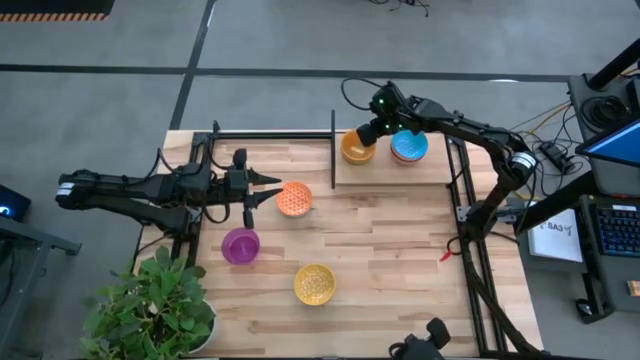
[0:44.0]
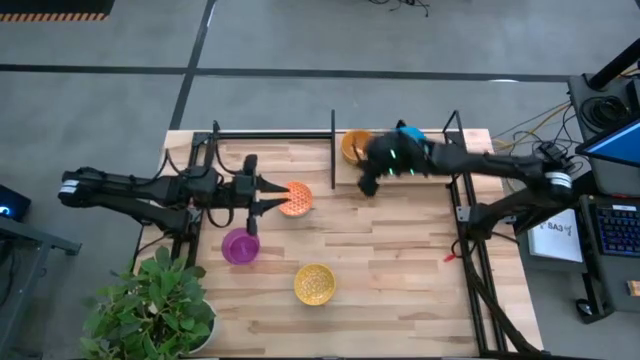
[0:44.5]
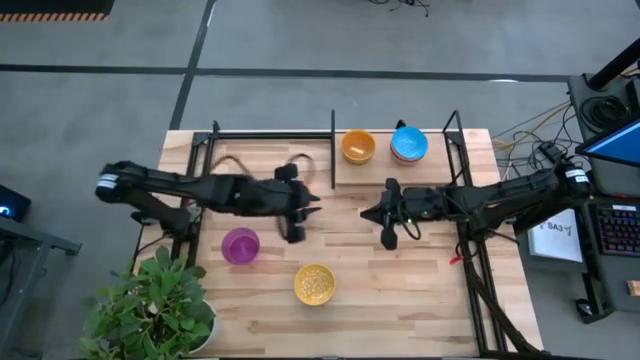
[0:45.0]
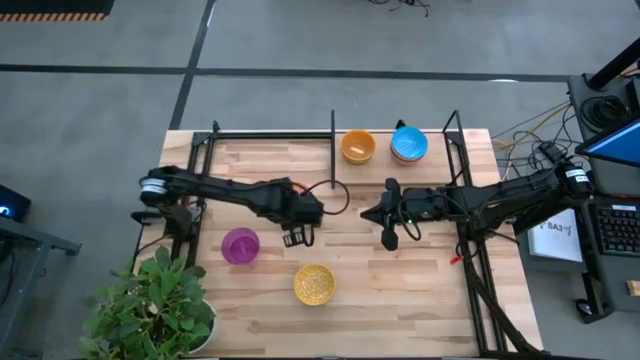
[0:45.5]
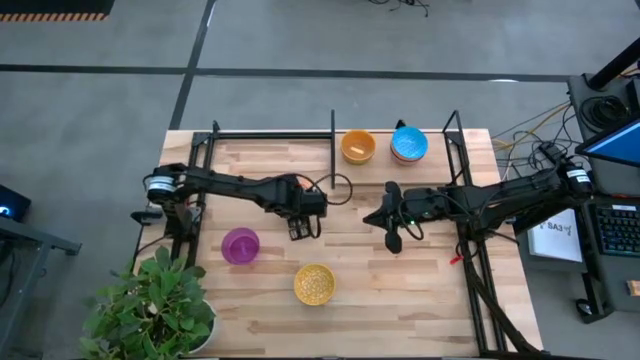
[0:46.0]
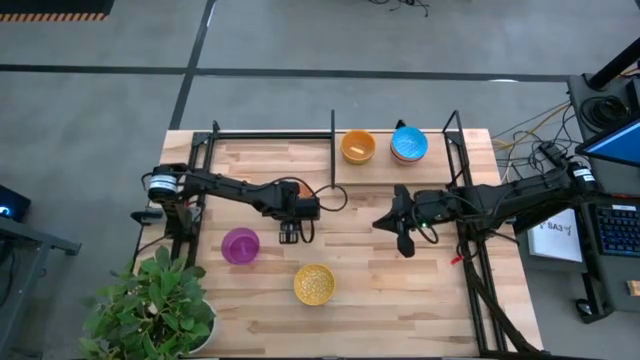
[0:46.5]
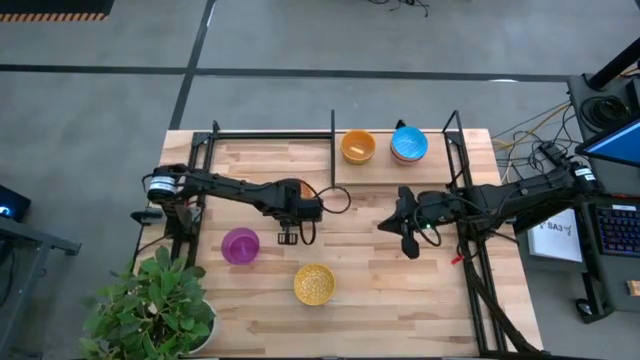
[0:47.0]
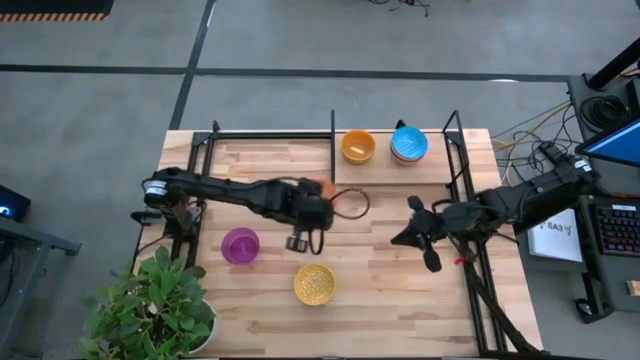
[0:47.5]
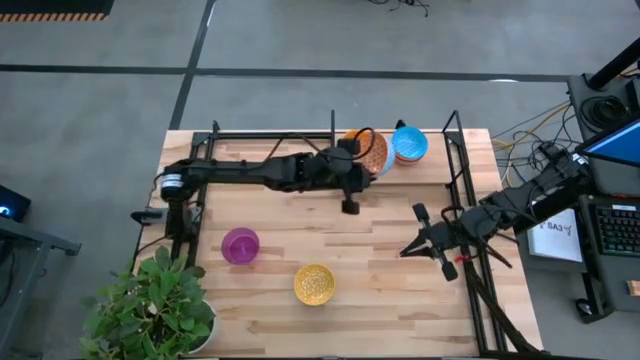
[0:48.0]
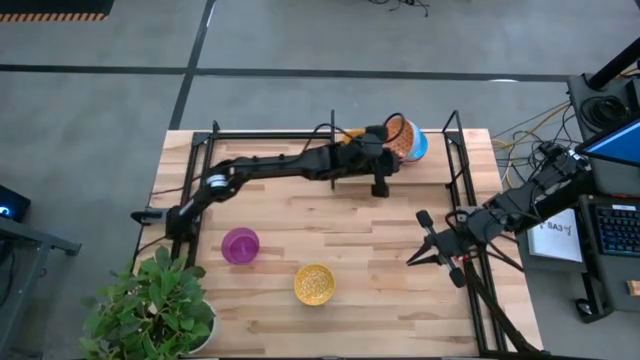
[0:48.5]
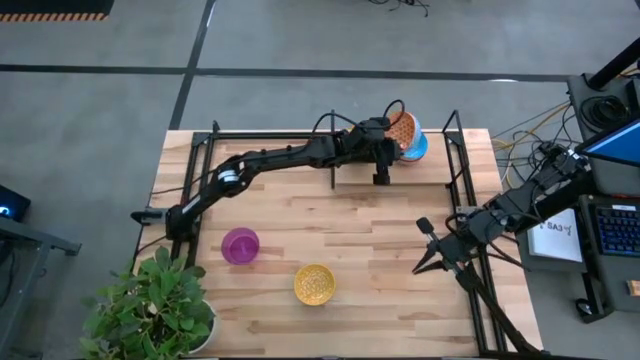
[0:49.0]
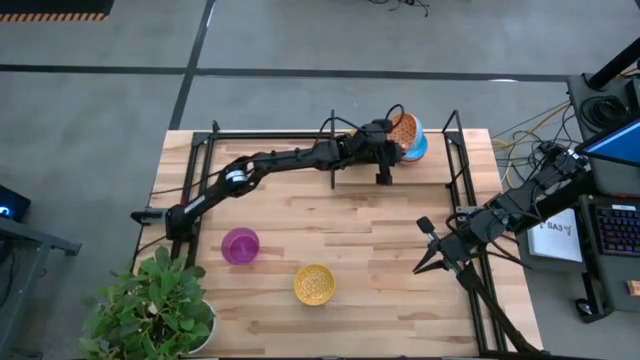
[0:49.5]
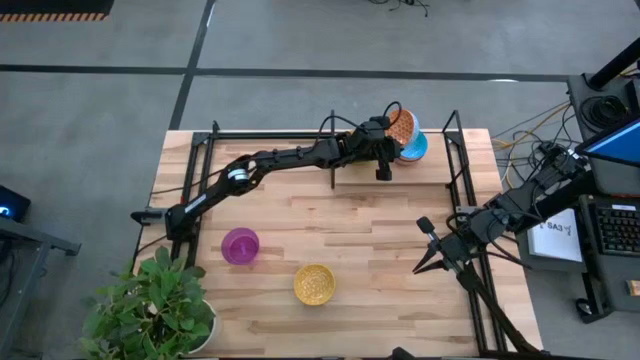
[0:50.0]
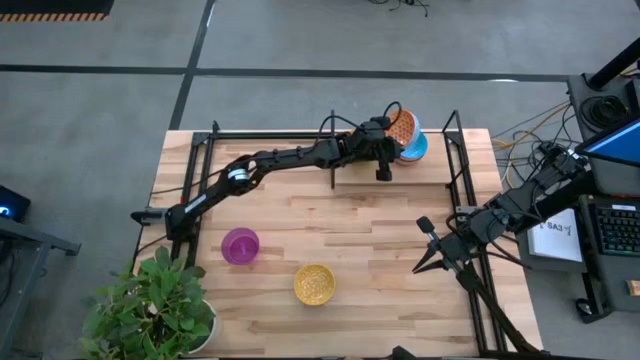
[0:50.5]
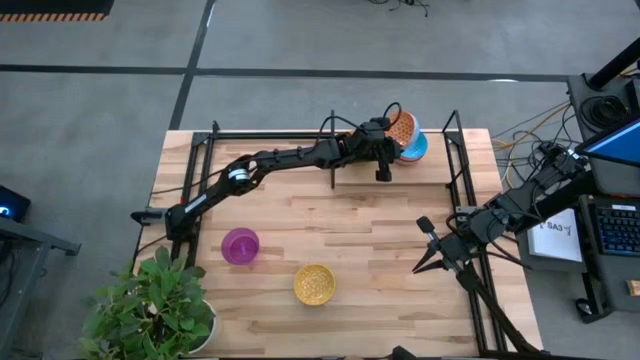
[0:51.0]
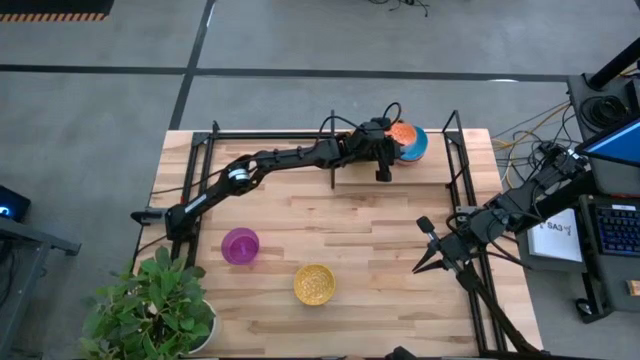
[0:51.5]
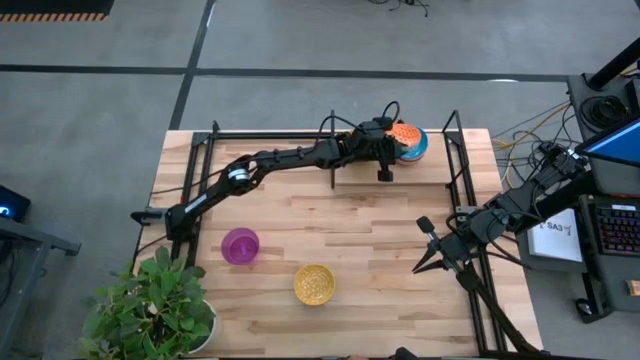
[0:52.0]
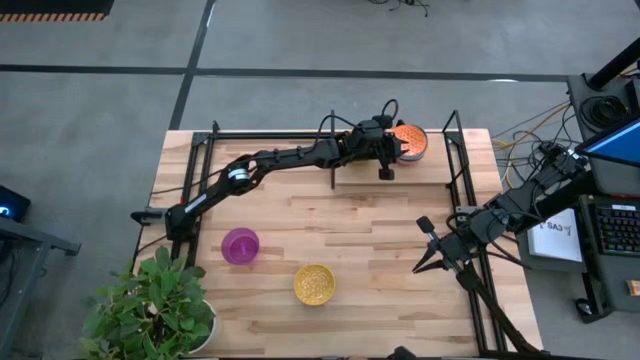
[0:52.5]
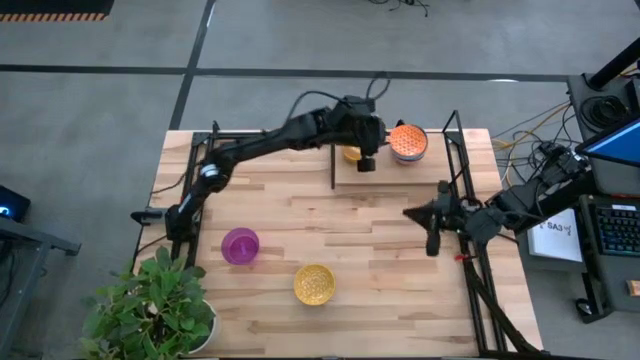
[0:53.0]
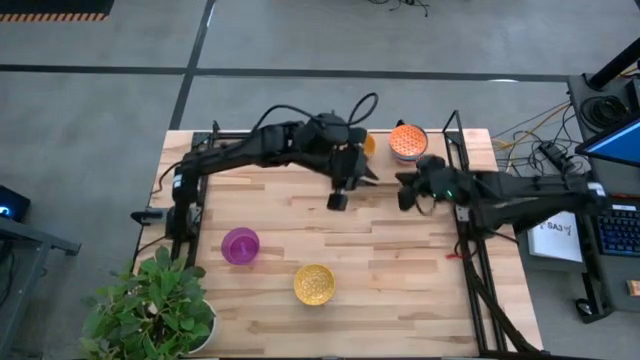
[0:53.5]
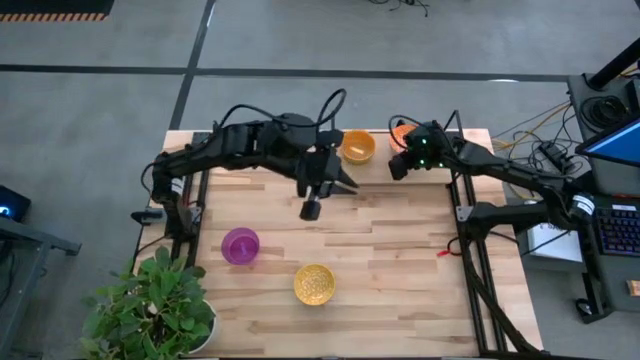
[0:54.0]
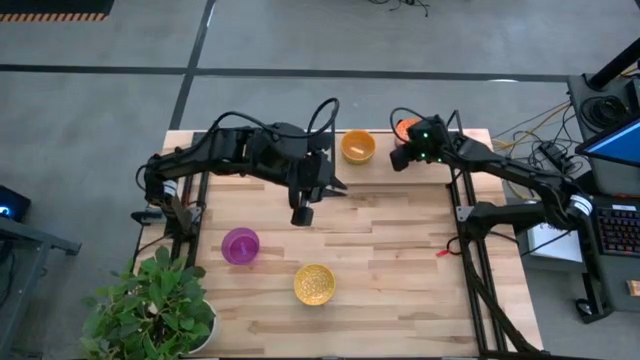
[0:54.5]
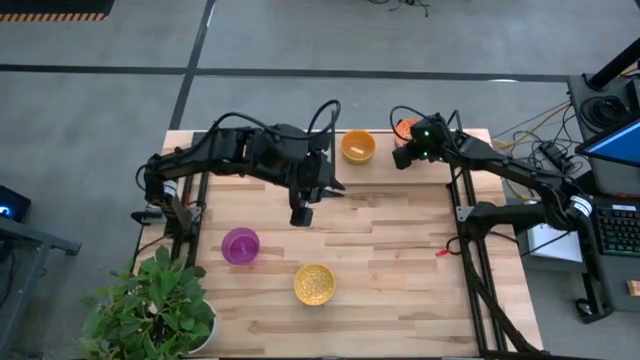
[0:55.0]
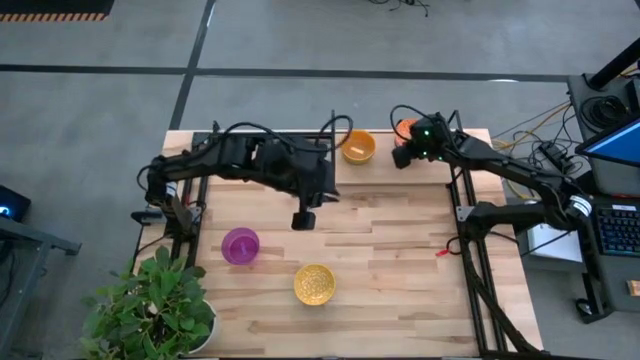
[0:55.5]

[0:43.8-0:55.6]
Task: Place and stack bowls onto a shelf
Stack the orange patterned bowl on top of the blue patterned bowl on the shelf

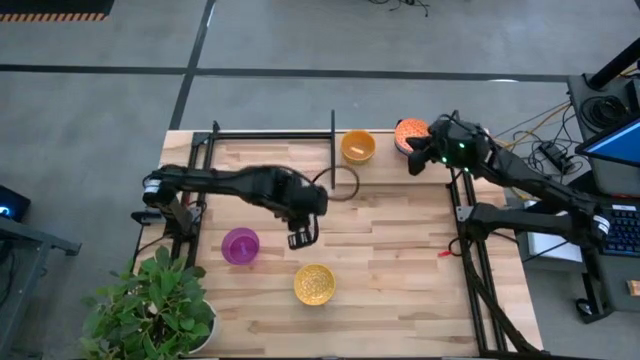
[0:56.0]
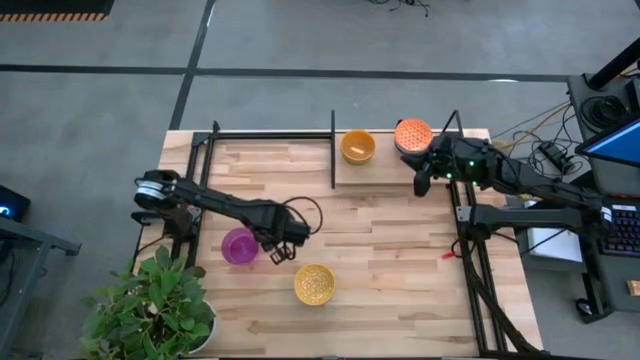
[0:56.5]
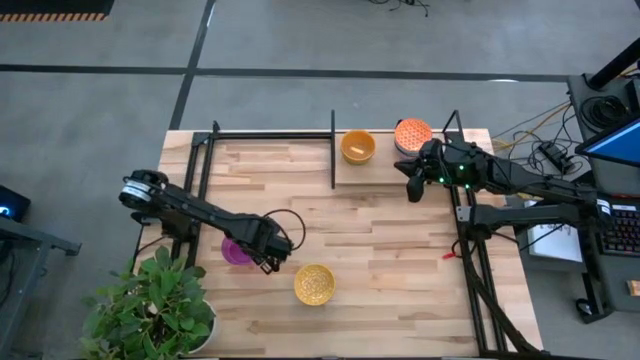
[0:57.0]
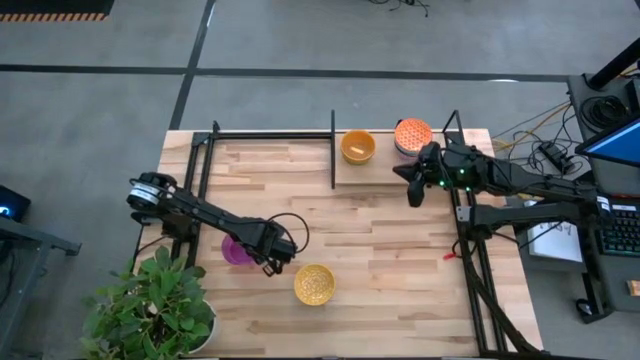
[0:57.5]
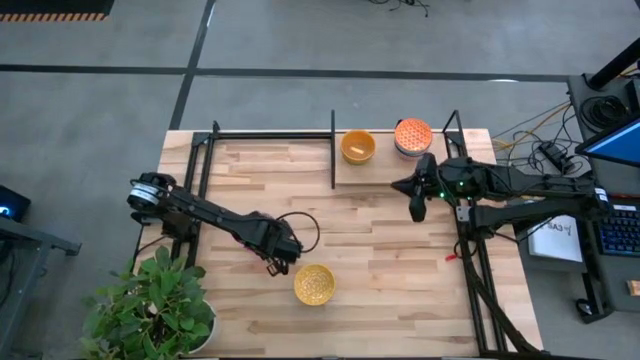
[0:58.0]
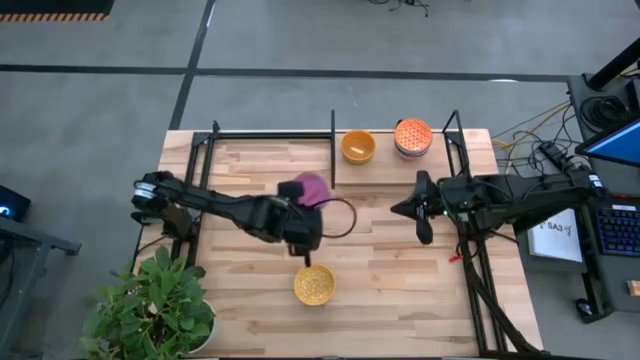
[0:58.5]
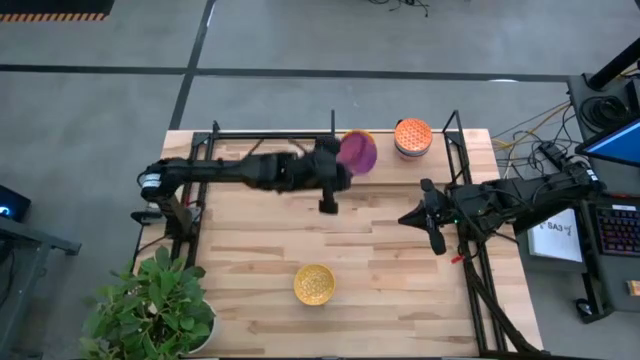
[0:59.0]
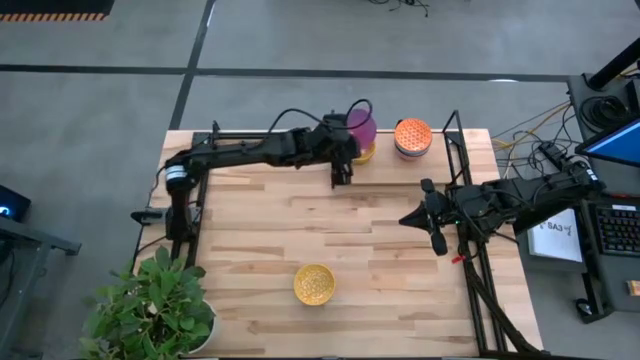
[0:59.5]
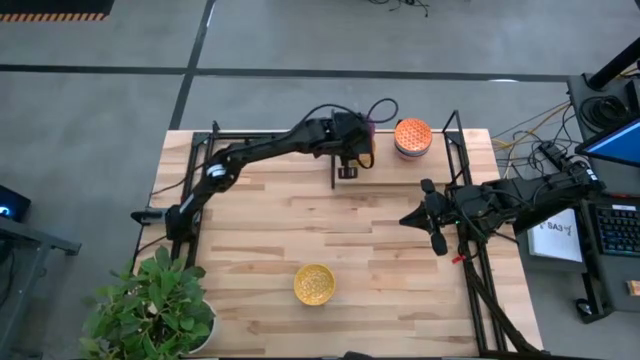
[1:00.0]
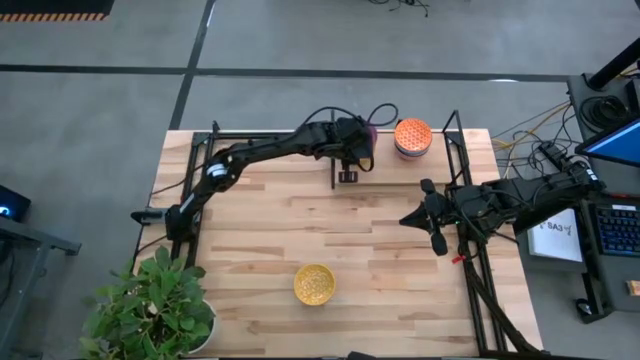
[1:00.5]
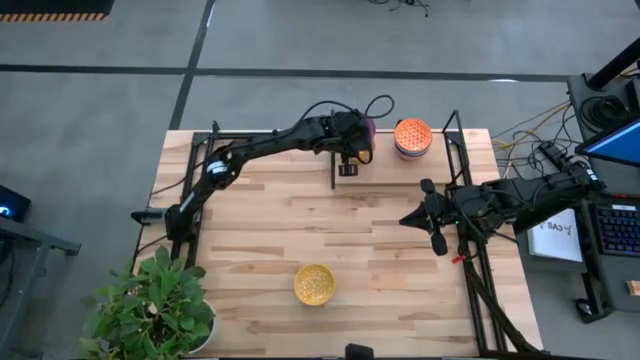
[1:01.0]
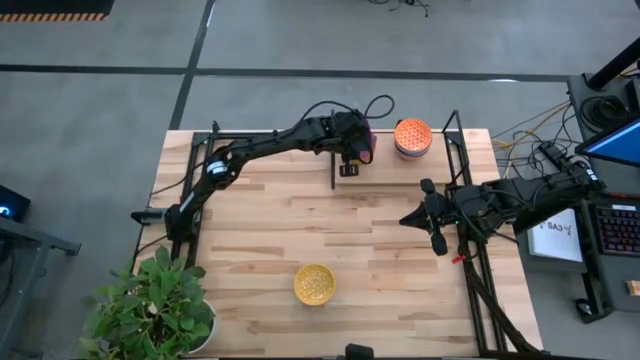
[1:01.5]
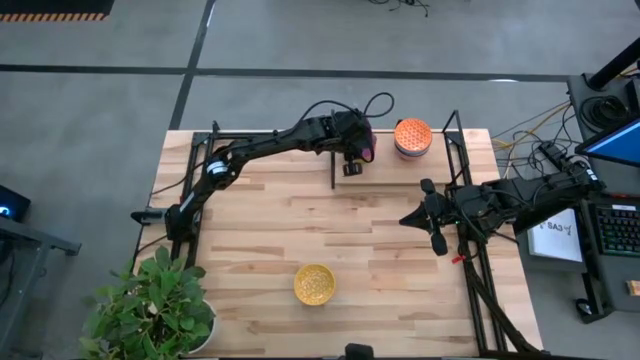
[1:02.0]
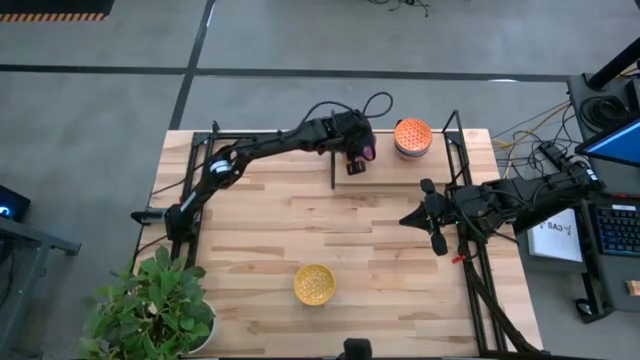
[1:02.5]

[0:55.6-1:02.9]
Stack the violet bowl on top of the yellow bowl on the shelf

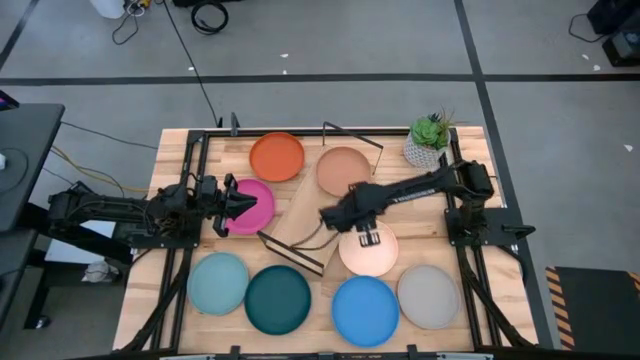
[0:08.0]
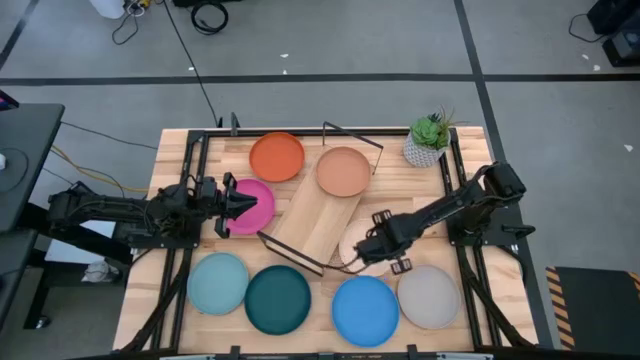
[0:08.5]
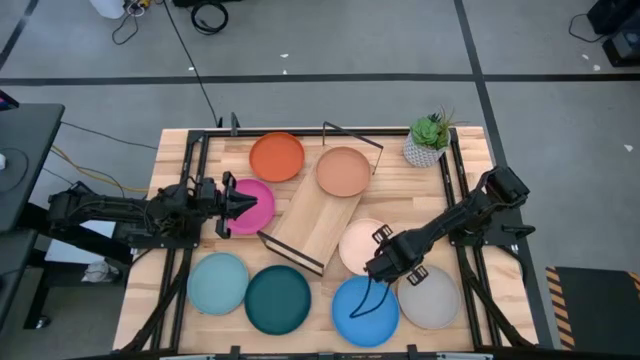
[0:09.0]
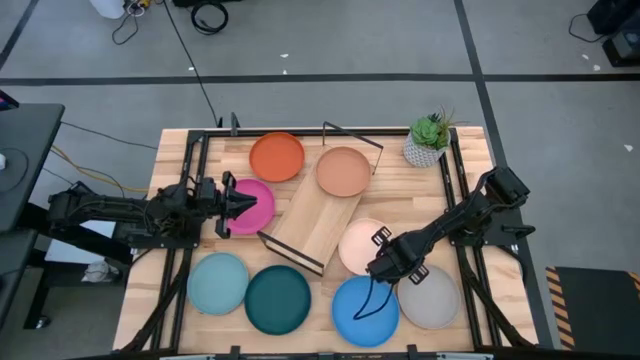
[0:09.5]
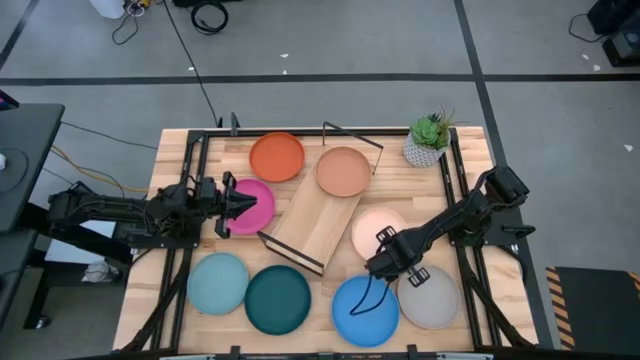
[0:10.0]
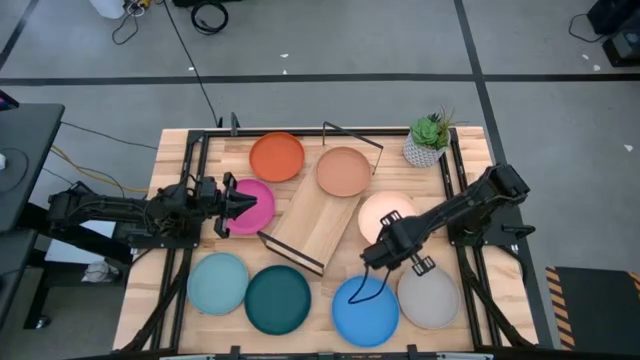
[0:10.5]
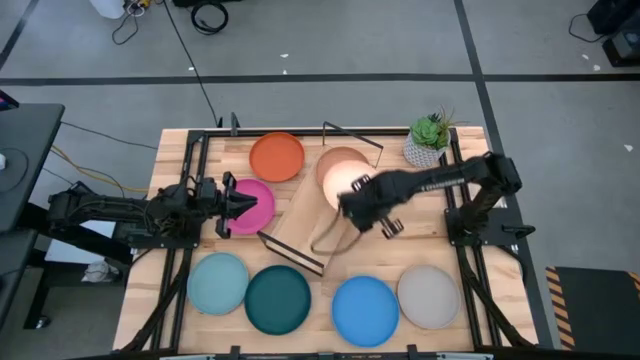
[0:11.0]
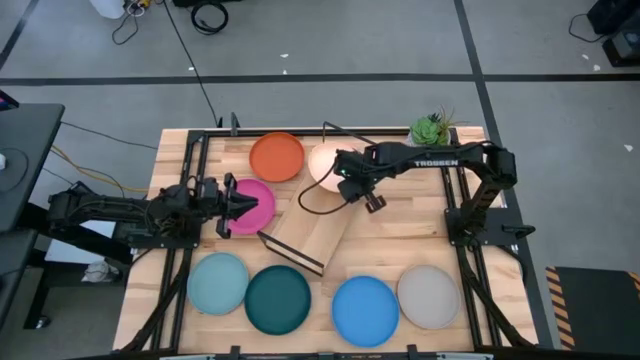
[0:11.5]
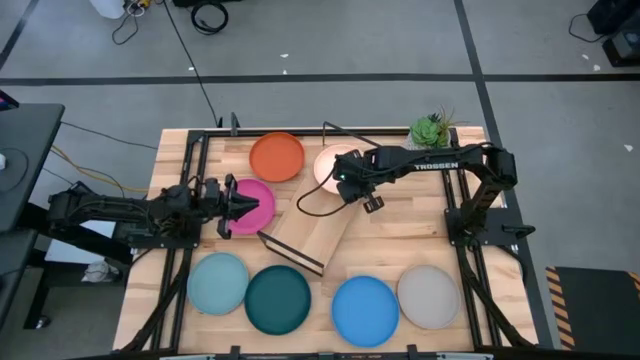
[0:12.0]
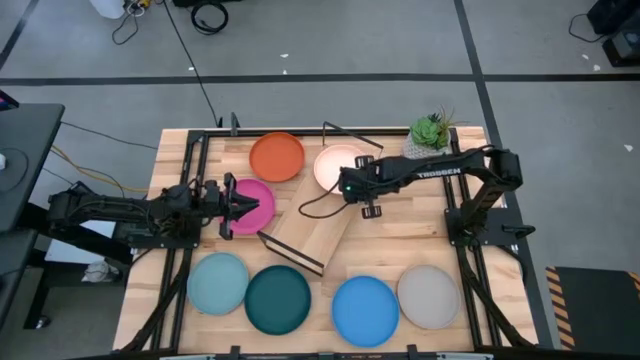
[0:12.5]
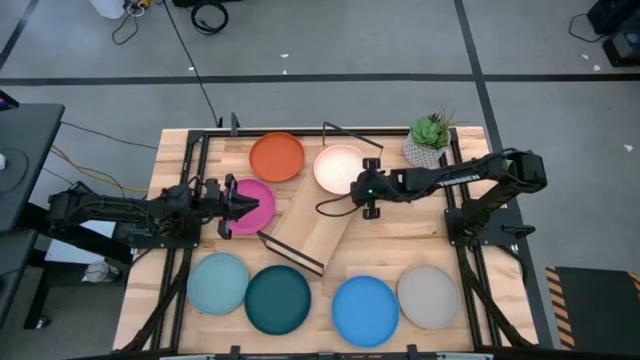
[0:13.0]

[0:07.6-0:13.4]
Task: Place and stack plates onto a shelf
Stack the white plate on top of the brown plate on the shelf
